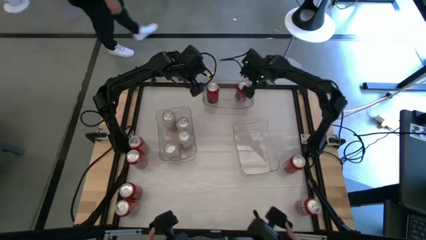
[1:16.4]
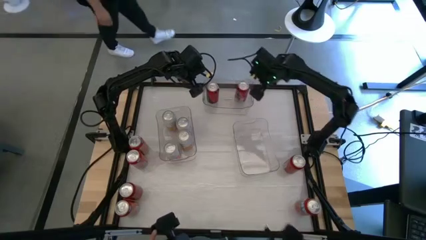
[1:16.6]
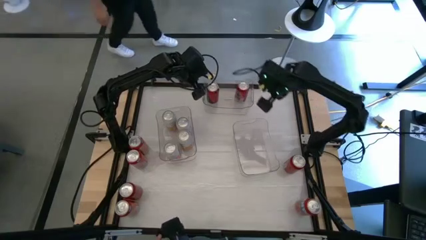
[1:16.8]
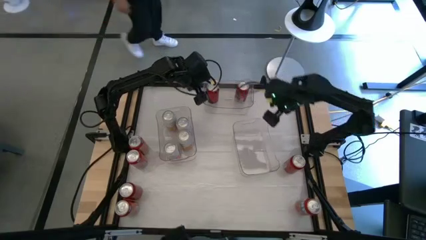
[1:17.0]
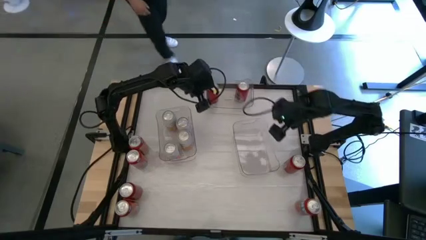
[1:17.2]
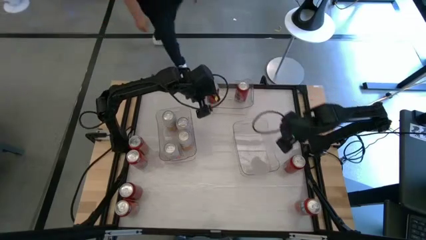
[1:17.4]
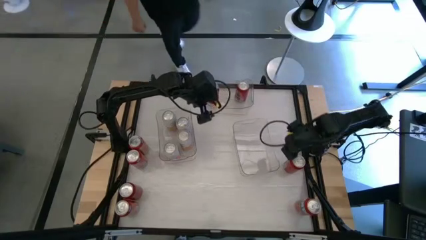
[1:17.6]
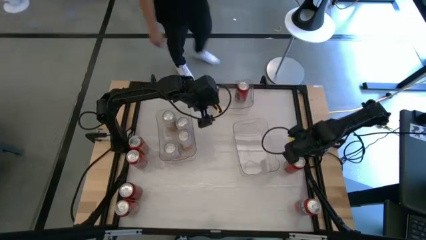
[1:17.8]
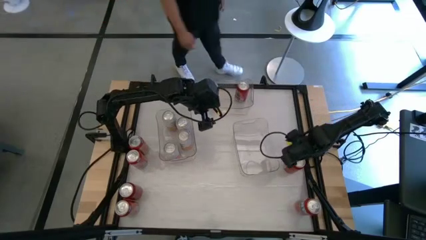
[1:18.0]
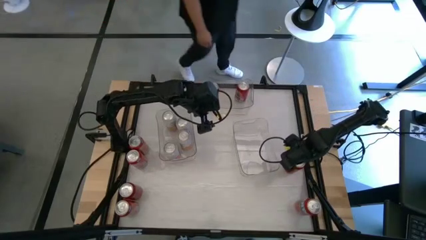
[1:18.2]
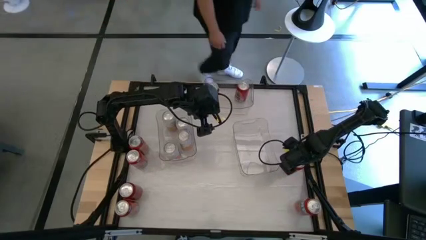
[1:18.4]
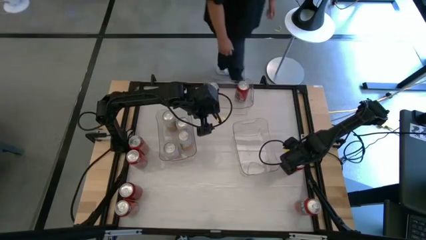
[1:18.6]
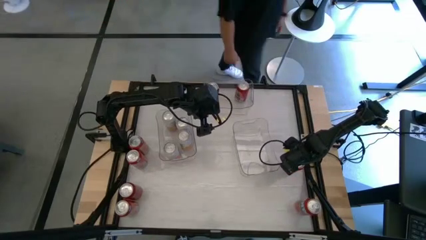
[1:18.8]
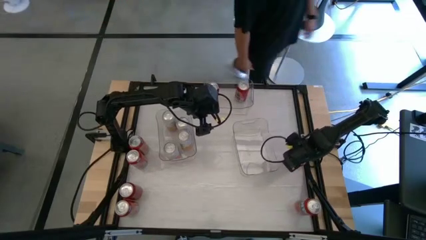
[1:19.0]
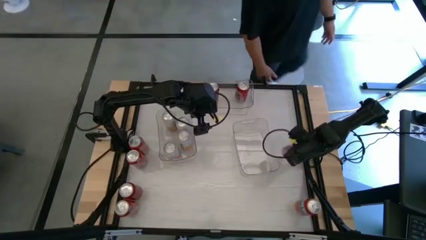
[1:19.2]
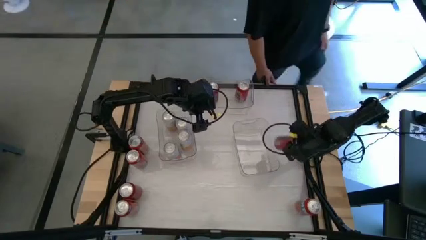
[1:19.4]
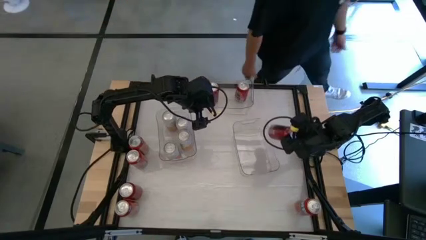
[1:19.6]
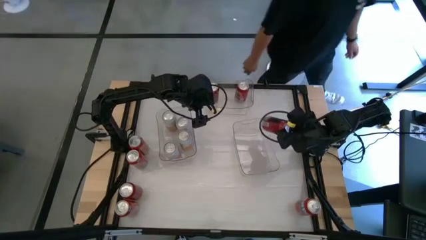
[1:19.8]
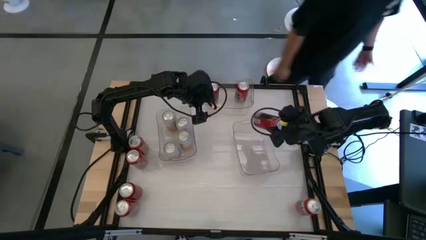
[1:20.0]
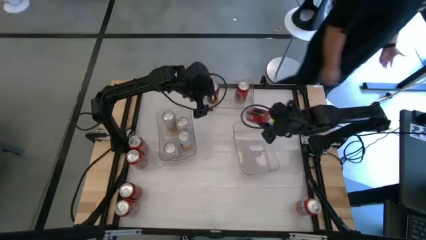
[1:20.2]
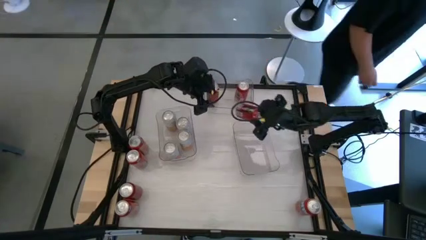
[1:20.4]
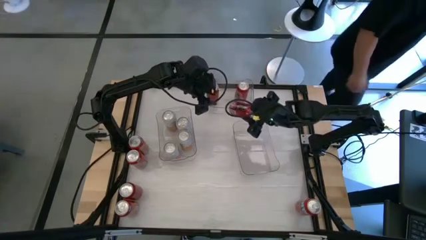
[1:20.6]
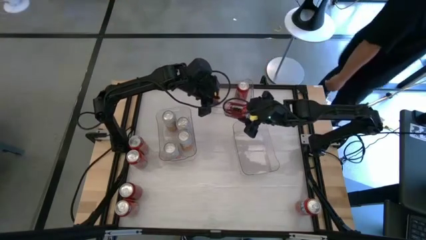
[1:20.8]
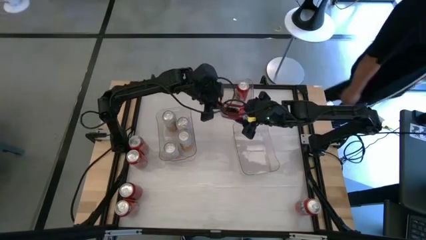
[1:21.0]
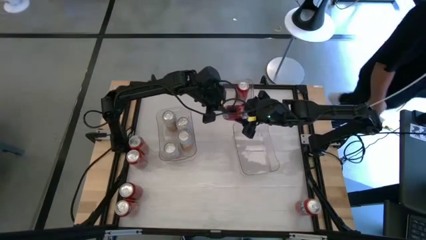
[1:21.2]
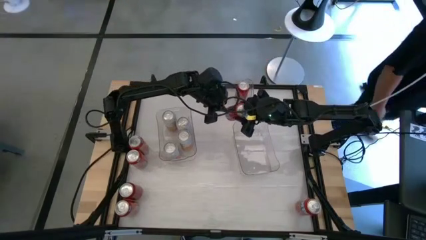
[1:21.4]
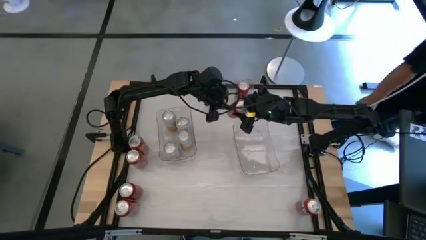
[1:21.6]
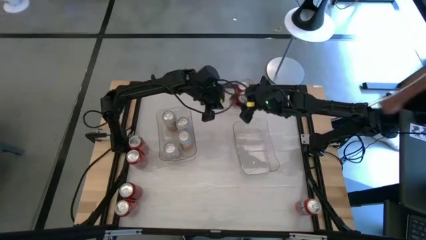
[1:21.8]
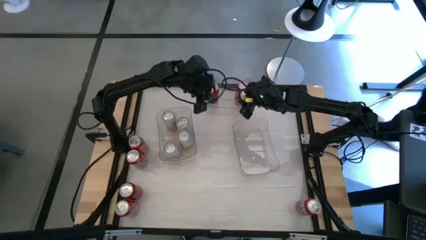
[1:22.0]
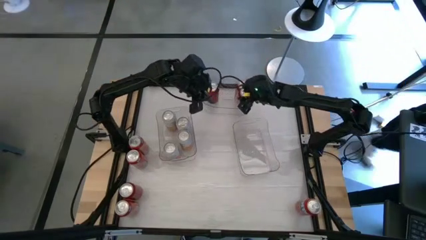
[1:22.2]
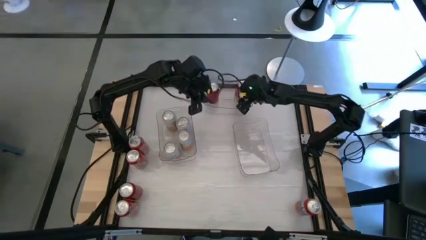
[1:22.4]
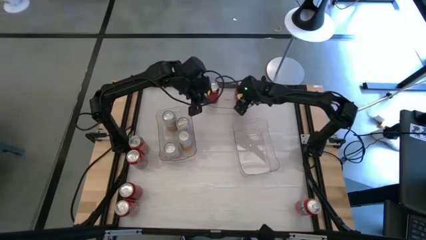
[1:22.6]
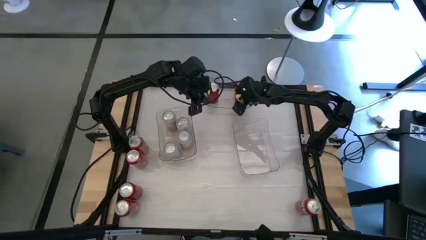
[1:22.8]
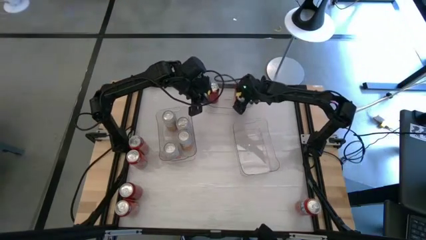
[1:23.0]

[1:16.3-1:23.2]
Task: Sort soda cans
Put the right red black soda can into the middle transparent bin

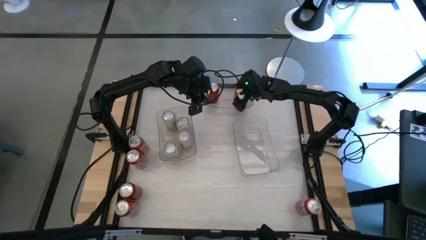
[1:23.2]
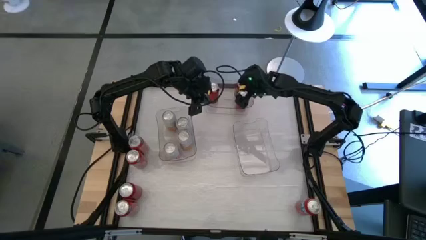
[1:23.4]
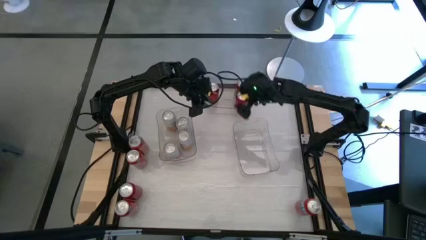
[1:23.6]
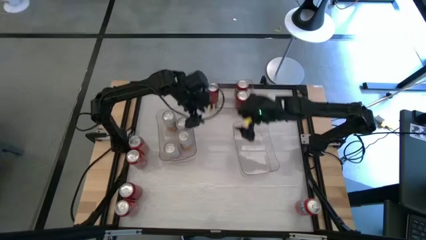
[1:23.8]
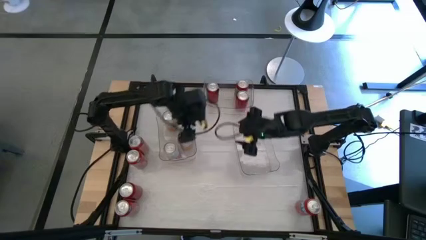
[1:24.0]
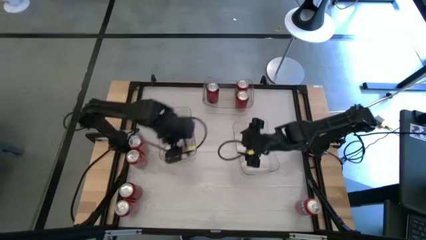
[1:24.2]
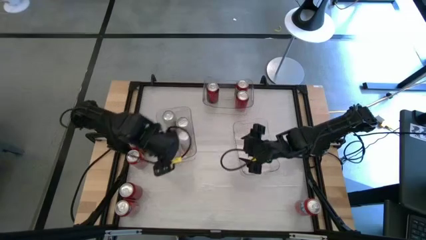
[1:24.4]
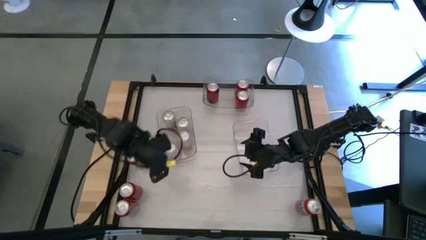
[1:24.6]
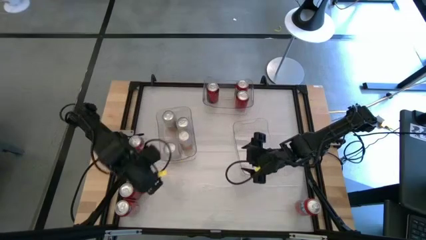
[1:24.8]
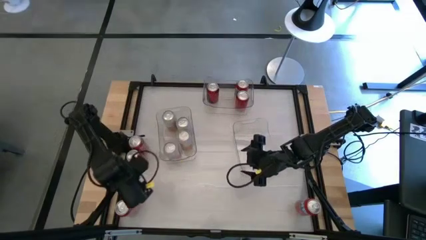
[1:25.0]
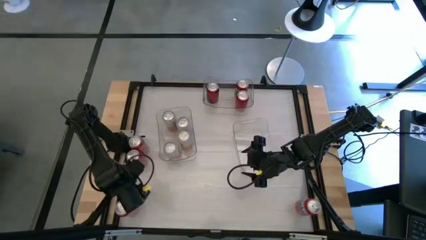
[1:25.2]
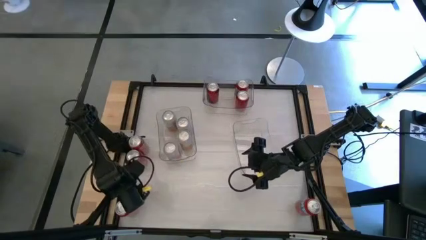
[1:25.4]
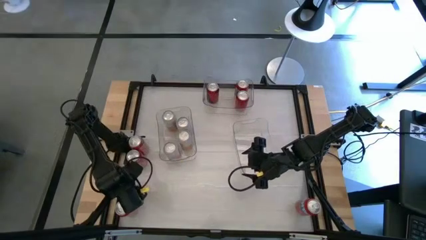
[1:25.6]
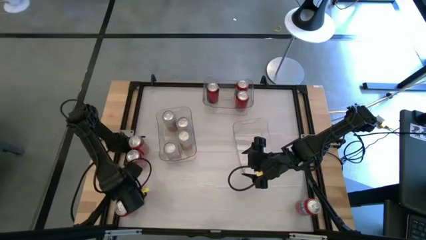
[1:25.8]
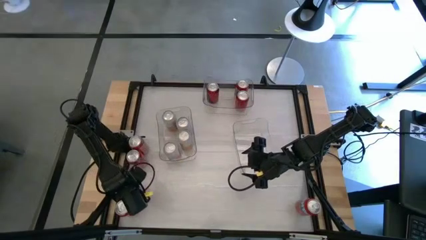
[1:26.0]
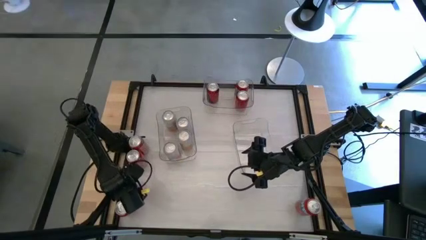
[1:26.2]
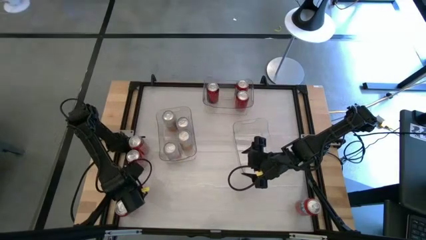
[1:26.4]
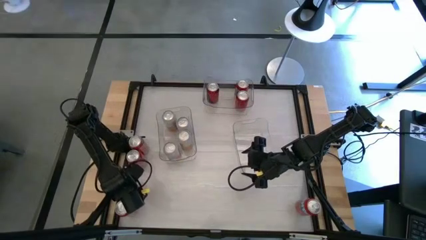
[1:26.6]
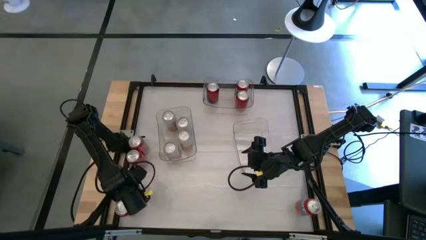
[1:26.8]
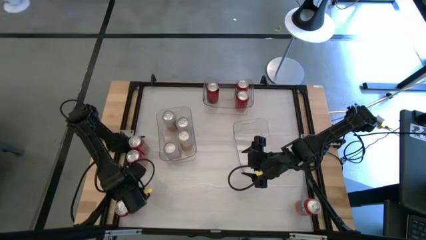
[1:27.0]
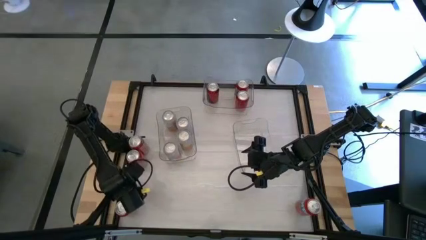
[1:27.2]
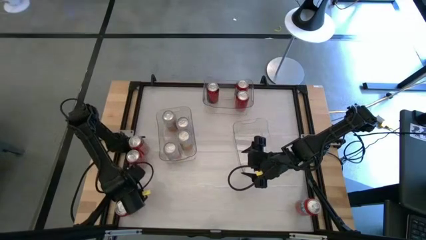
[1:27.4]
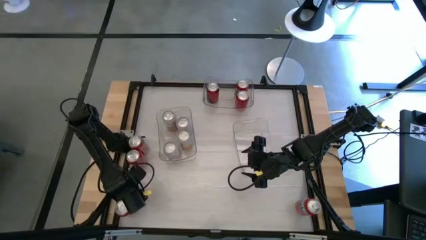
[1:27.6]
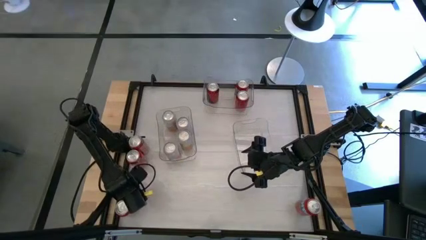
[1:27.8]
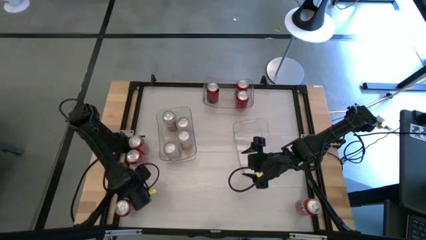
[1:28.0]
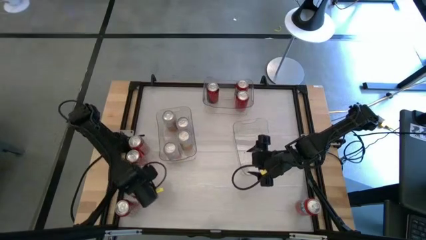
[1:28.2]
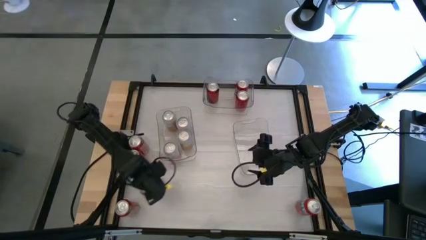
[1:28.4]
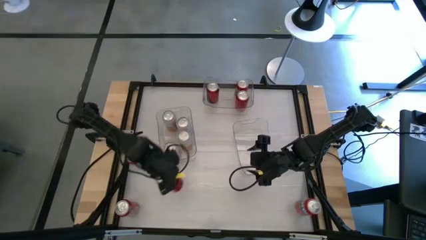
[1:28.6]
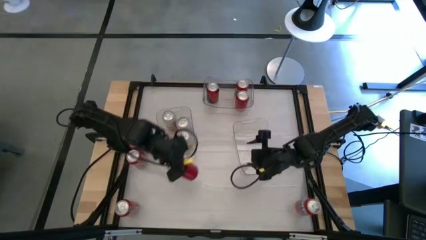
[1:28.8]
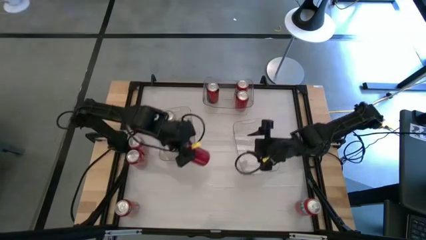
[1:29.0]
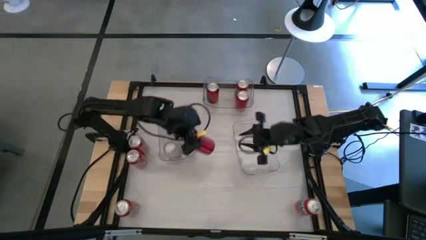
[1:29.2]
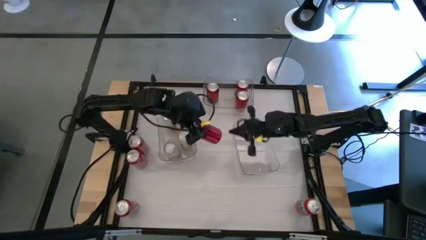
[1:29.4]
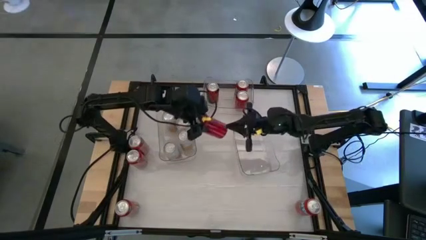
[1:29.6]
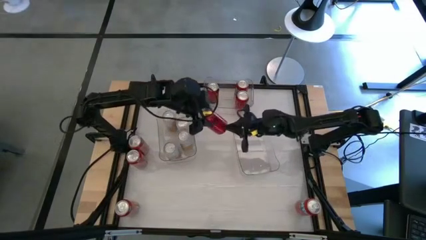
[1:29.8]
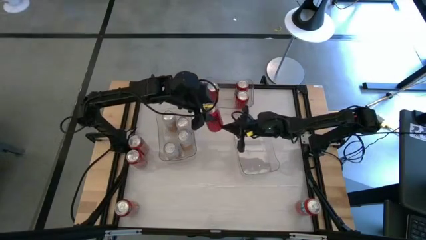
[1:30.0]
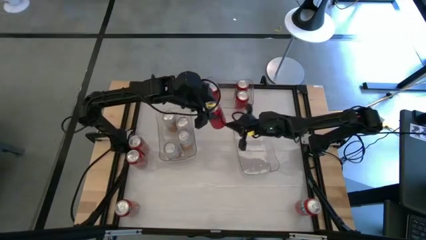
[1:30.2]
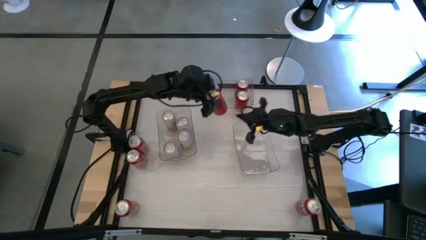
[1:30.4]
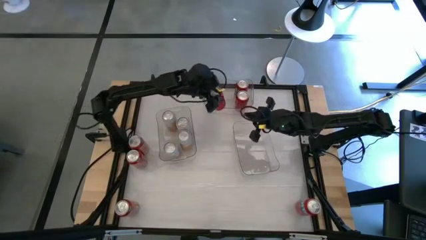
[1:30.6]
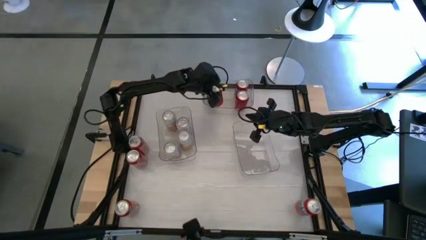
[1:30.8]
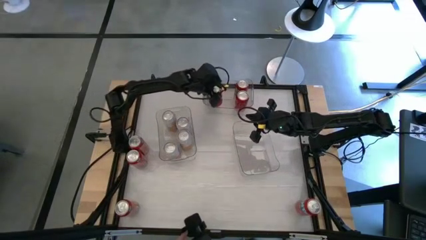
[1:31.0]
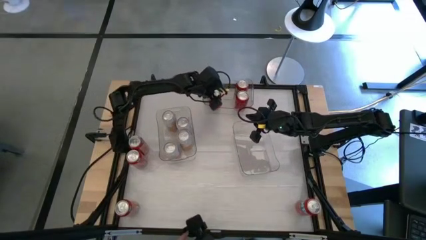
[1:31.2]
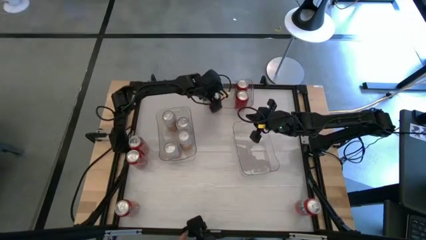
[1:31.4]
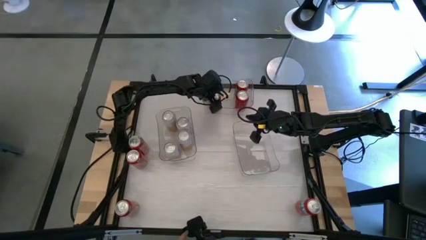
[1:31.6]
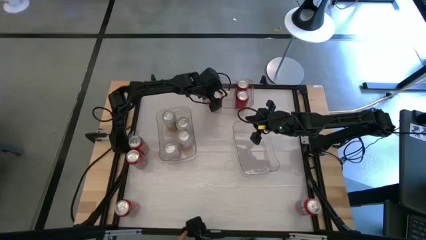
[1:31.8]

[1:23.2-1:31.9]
Put the red black soda can into the middle transparent bin
